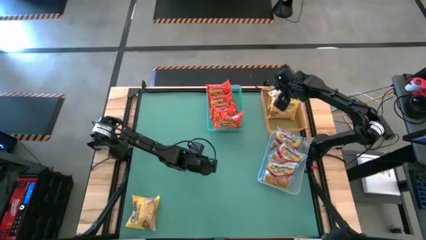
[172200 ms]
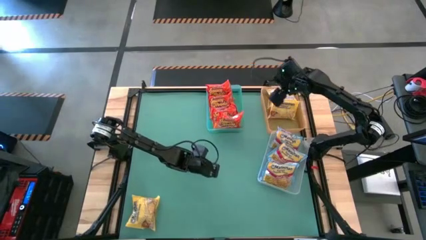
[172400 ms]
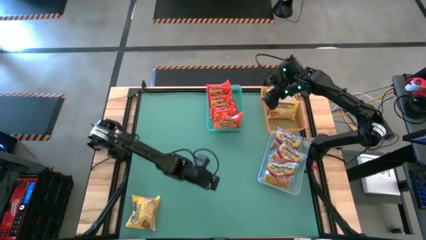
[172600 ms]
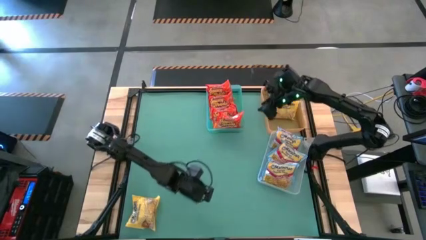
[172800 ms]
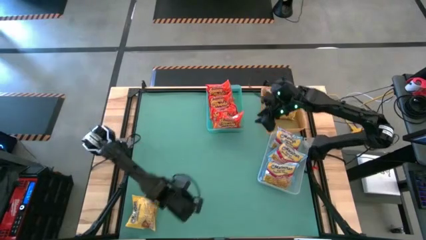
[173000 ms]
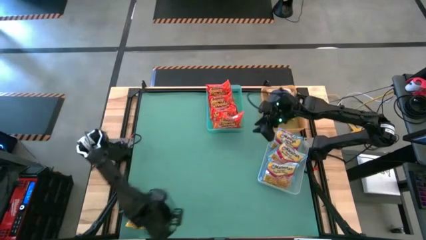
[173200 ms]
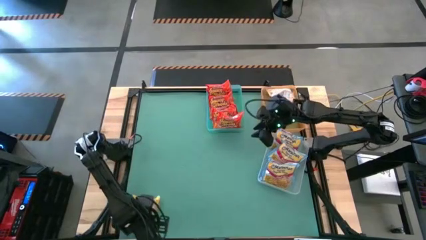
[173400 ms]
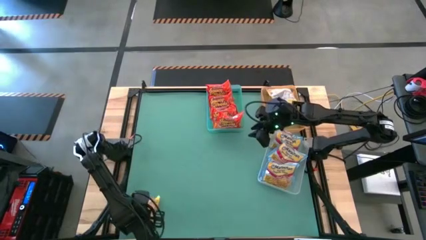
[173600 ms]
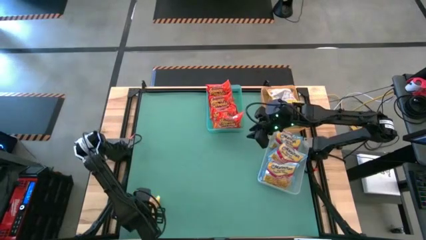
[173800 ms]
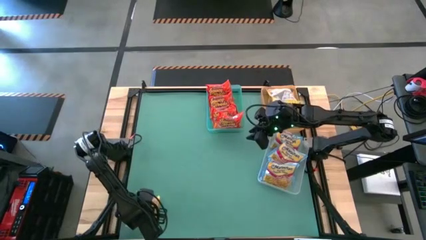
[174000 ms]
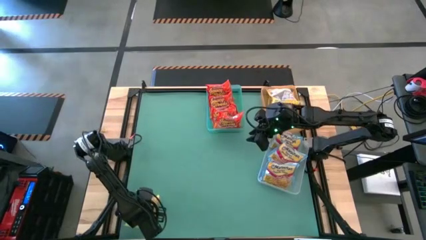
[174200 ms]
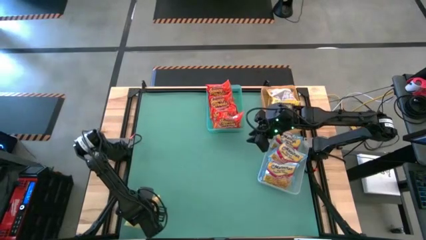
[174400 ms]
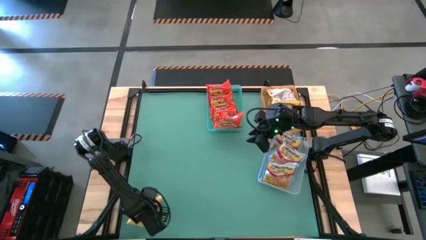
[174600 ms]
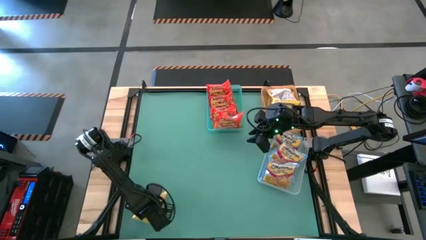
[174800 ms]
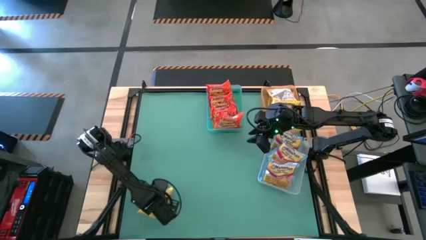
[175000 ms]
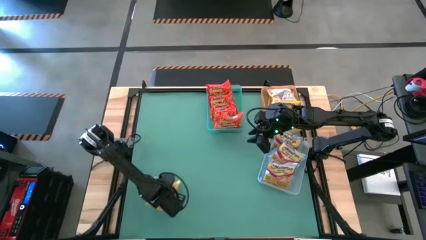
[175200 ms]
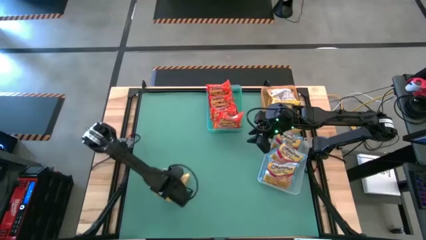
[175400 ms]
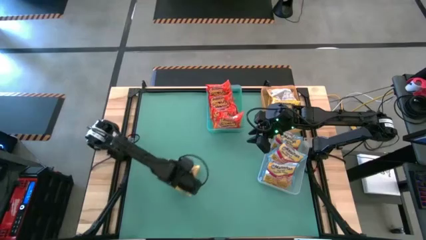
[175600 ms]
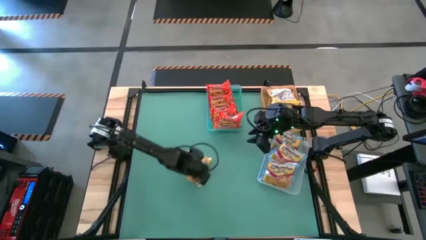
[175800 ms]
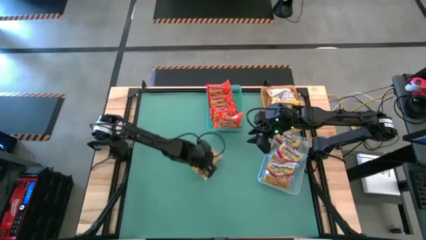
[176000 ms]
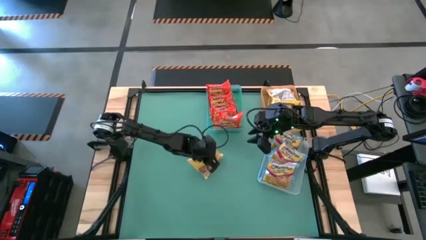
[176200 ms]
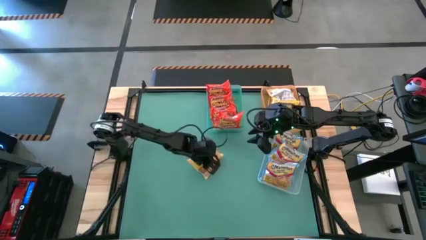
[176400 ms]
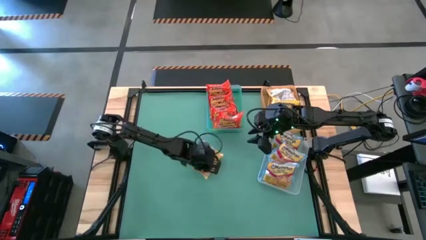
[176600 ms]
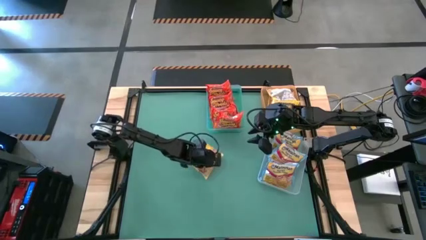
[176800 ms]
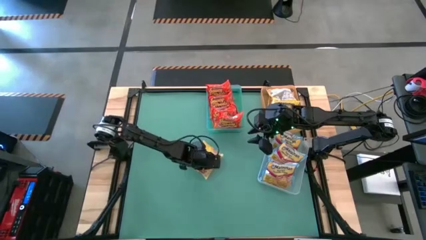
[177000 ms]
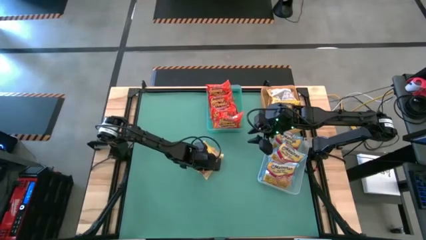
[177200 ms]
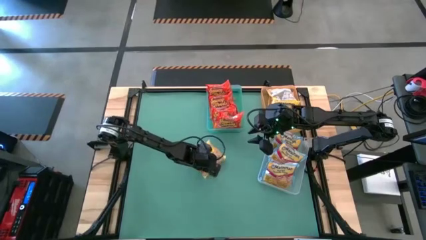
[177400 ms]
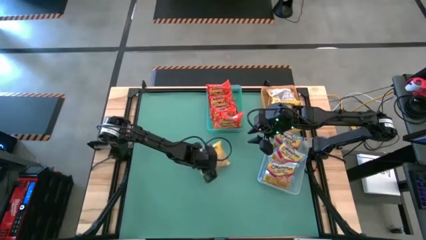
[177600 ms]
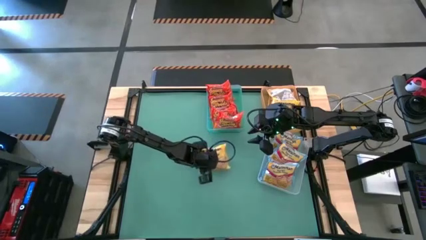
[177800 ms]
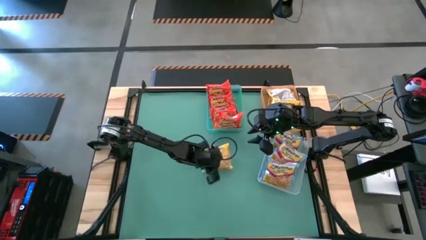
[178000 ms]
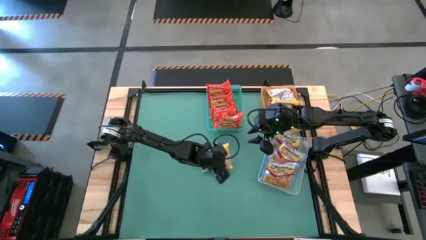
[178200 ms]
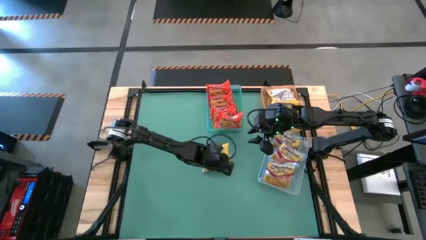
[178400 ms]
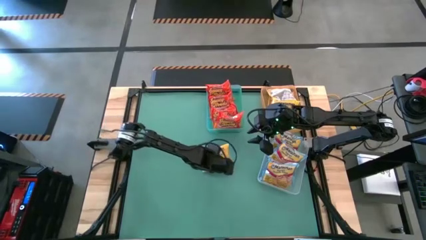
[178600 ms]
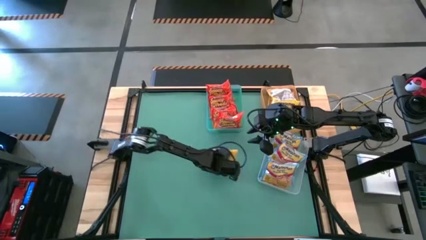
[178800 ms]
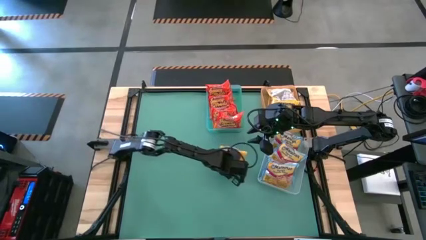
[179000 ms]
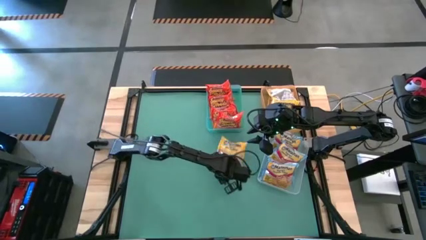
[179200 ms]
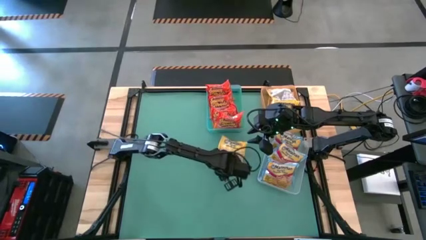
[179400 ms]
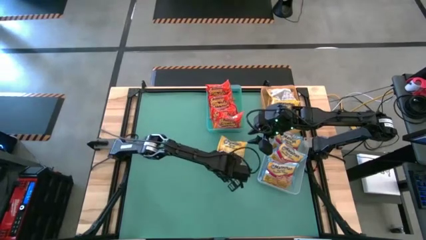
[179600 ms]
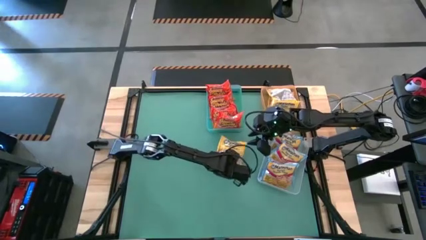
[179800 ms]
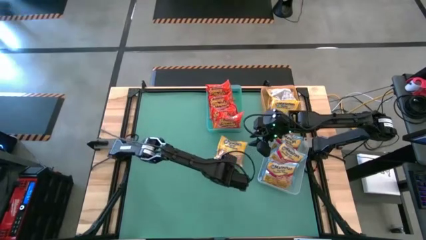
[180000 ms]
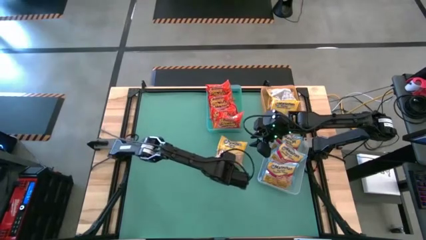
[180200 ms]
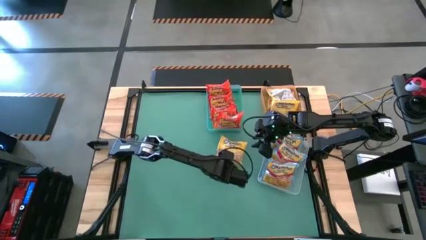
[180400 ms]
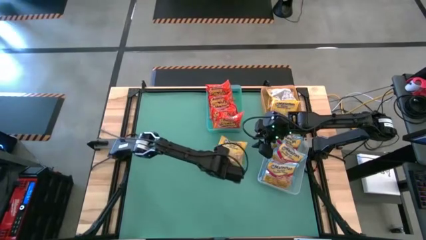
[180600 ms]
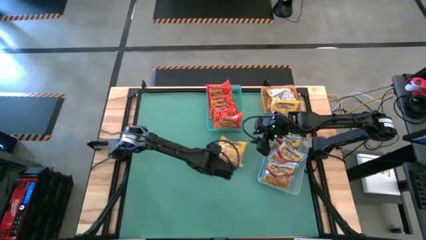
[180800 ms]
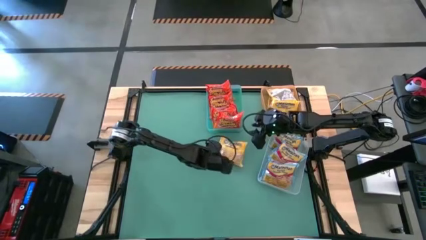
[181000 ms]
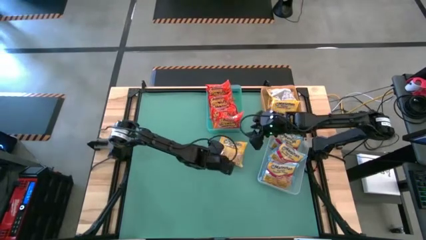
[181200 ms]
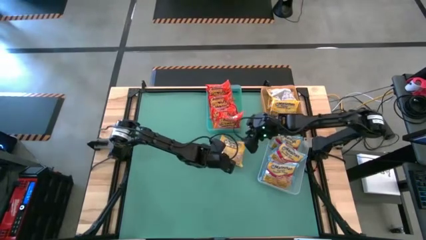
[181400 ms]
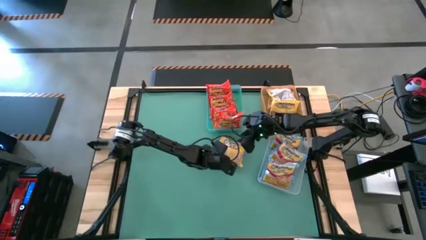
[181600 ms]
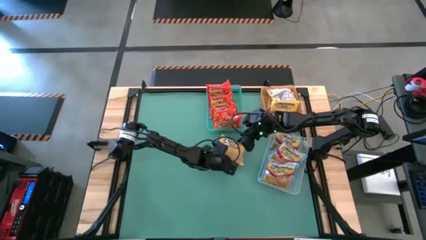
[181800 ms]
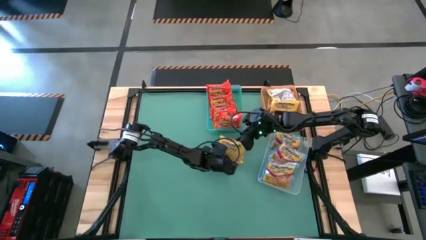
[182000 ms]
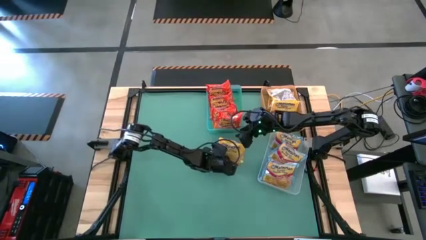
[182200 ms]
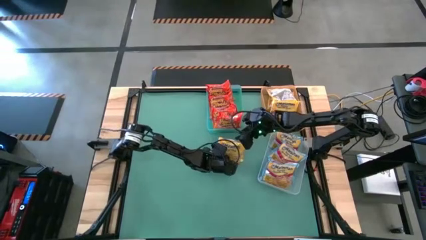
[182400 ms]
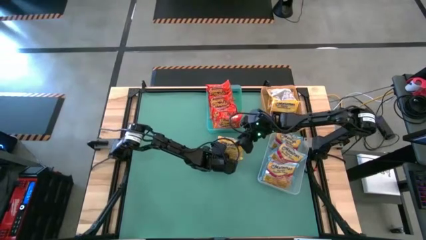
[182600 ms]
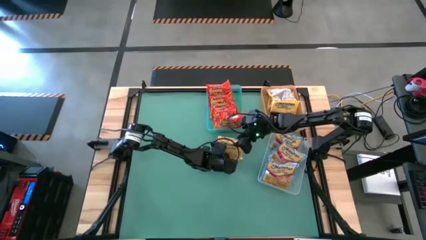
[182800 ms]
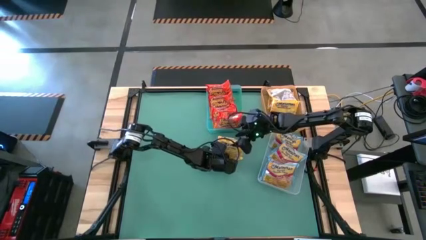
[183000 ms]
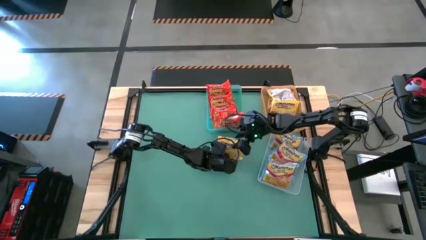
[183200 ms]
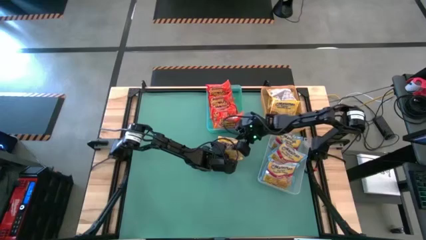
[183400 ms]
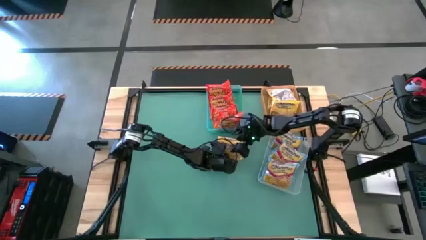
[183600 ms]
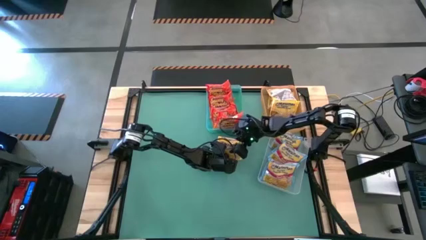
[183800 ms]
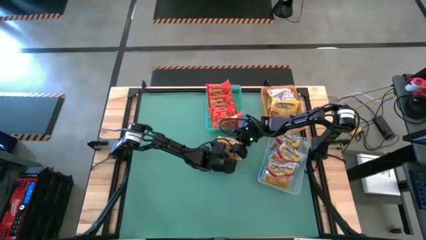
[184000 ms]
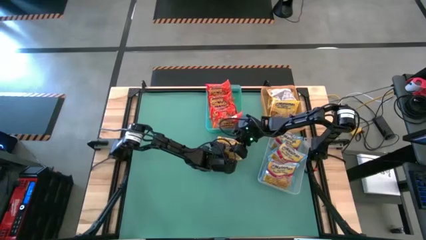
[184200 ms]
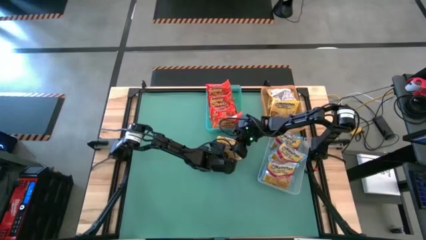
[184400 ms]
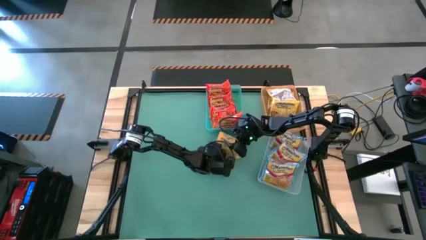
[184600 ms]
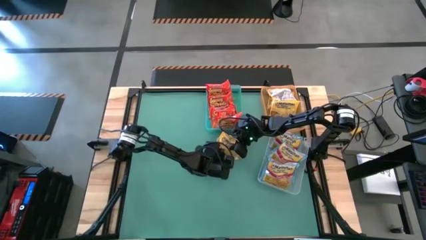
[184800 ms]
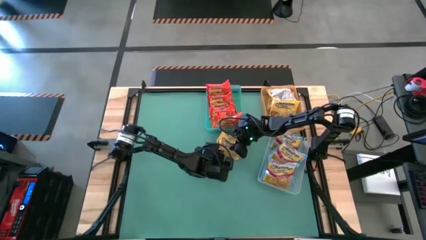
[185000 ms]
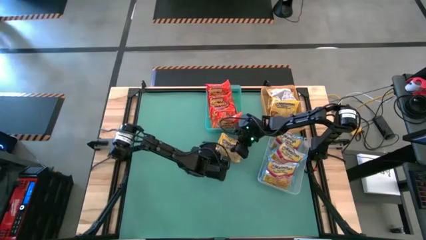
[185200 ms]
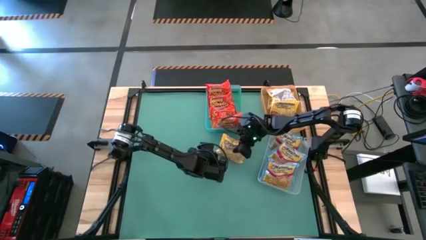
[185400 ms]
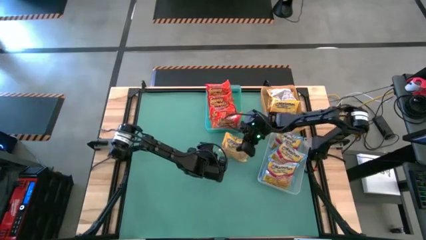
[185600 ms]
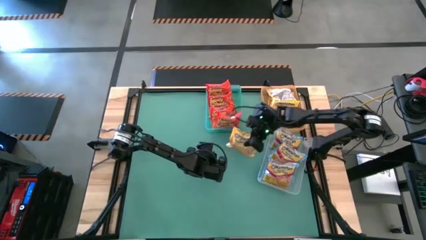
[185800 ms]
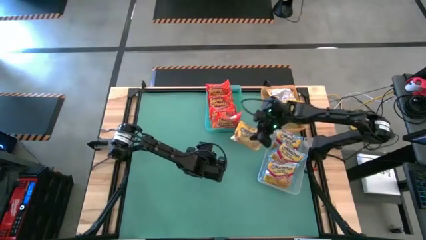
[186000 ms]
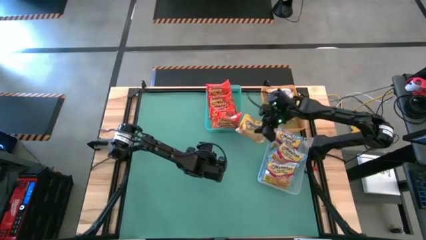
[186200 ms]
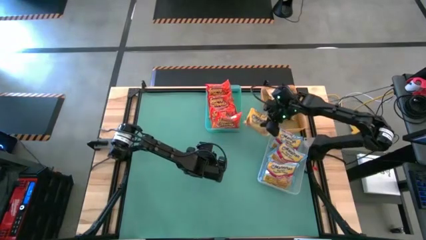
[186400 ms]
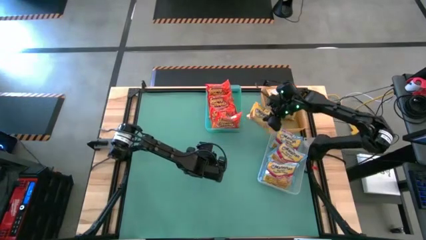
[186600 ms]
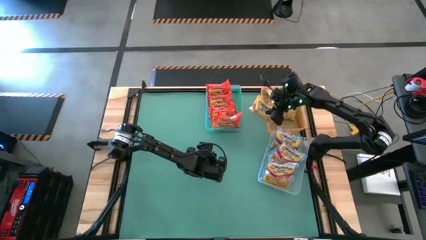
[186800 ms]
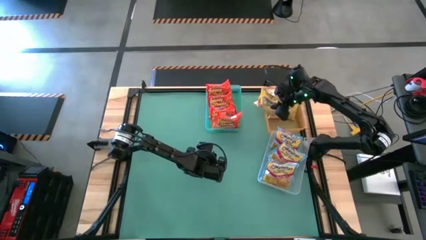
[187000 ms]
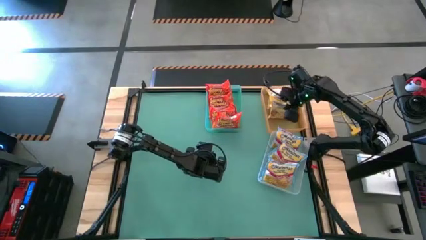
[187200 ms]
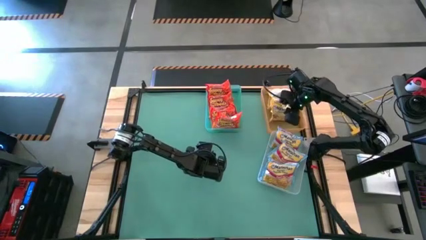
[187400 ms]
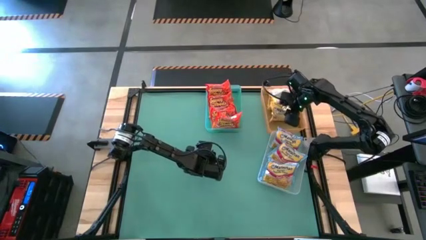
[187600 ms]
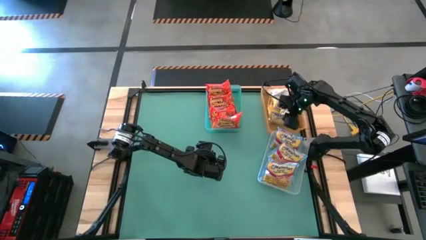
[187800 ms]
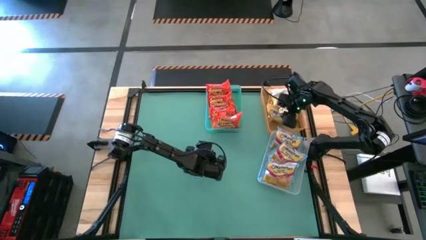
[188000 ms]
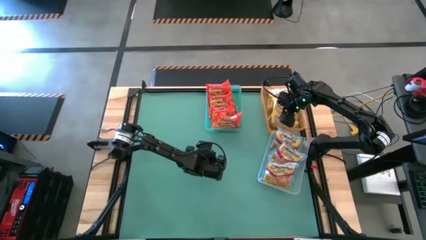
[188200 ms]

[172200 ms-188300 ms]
Task: Sort Maruchan noodles
Put the yellow noodle pack into the orange bin
